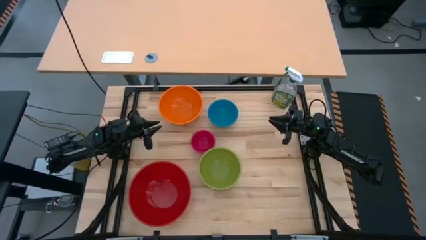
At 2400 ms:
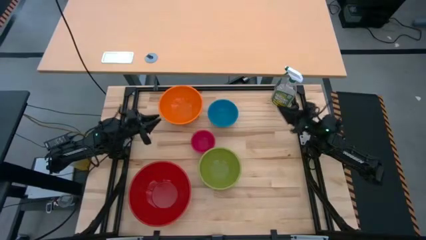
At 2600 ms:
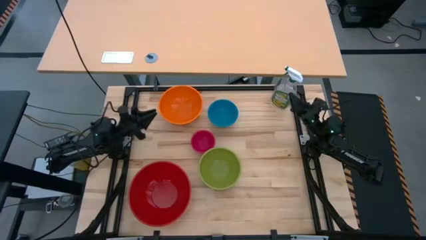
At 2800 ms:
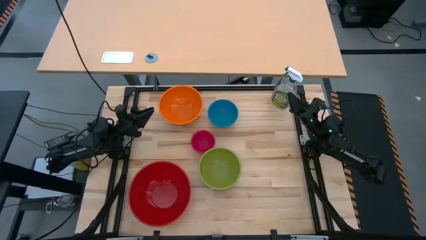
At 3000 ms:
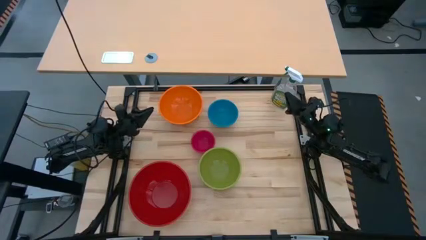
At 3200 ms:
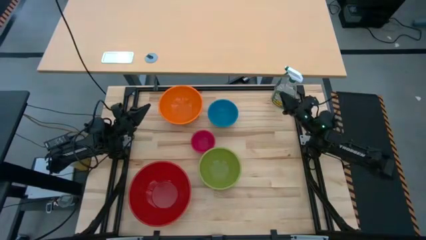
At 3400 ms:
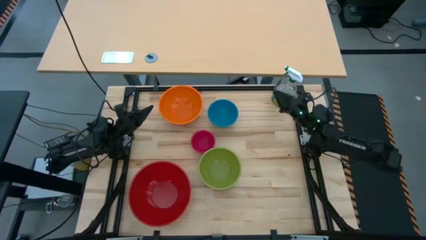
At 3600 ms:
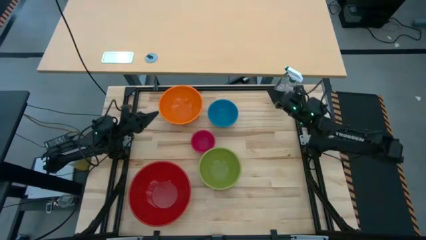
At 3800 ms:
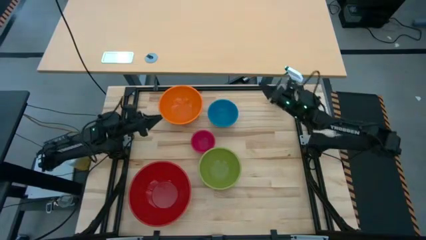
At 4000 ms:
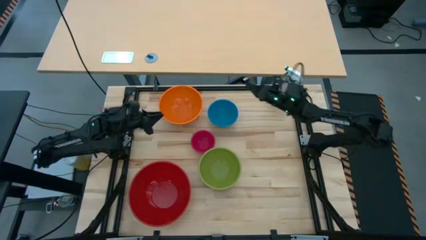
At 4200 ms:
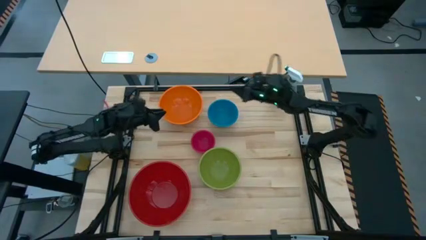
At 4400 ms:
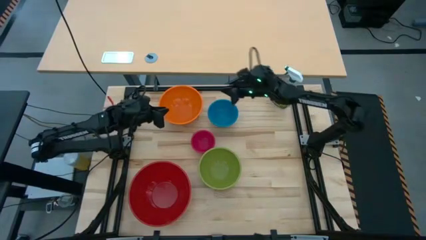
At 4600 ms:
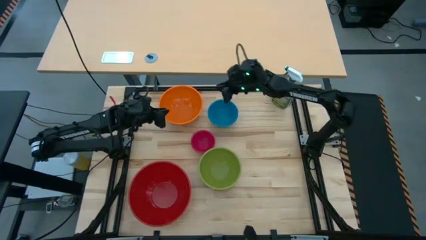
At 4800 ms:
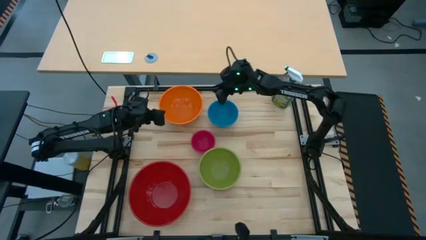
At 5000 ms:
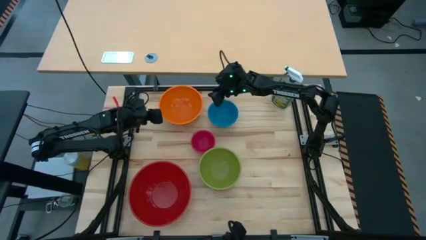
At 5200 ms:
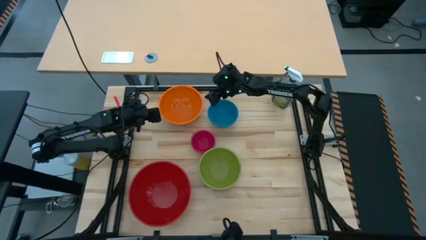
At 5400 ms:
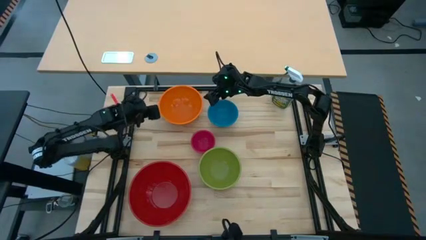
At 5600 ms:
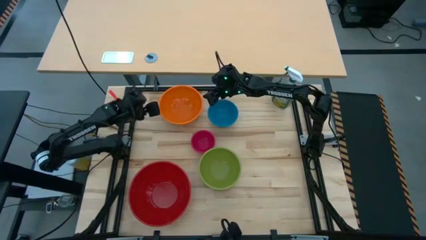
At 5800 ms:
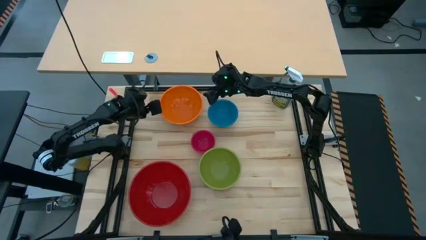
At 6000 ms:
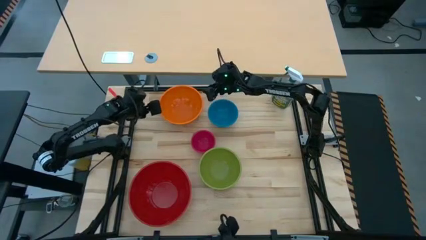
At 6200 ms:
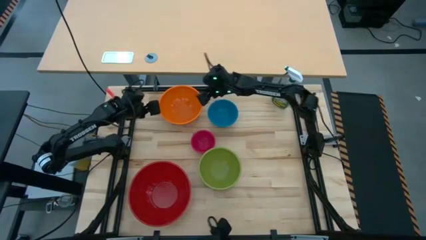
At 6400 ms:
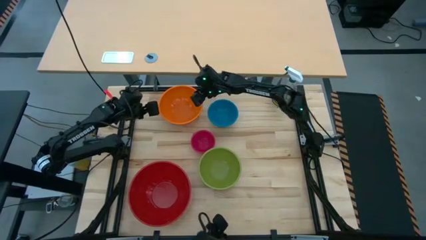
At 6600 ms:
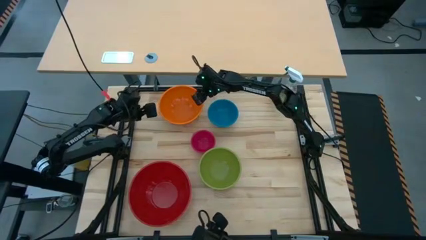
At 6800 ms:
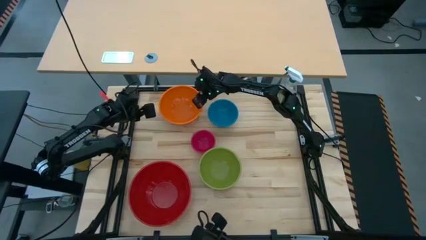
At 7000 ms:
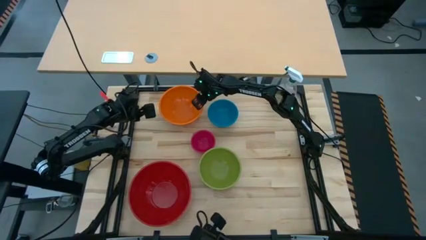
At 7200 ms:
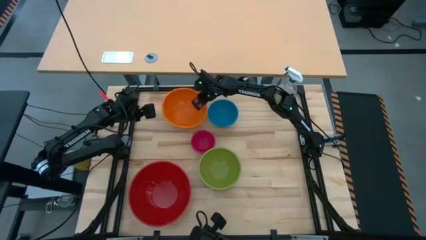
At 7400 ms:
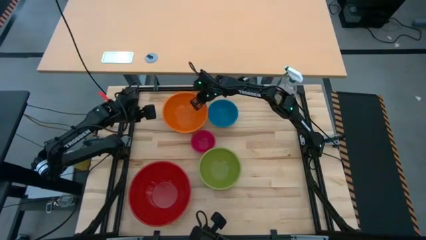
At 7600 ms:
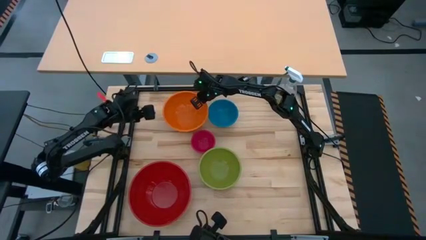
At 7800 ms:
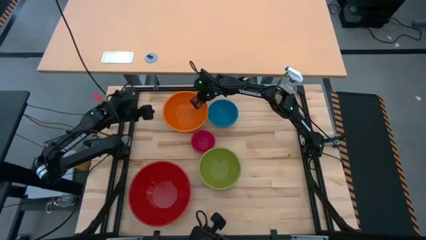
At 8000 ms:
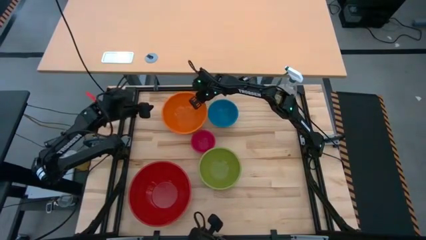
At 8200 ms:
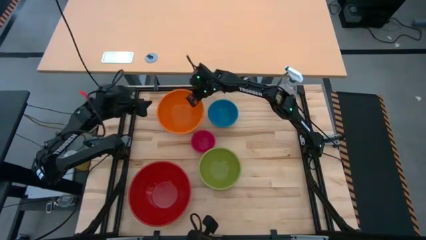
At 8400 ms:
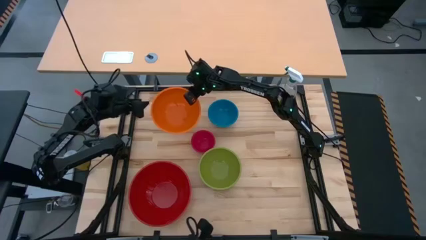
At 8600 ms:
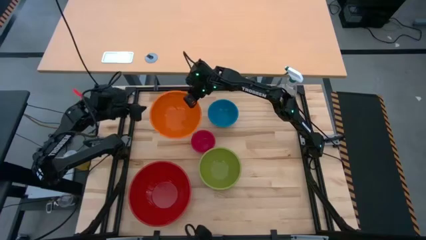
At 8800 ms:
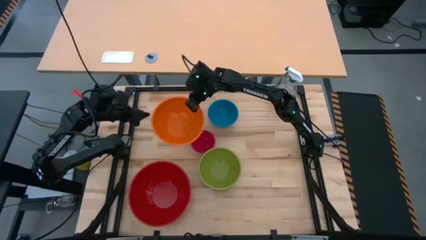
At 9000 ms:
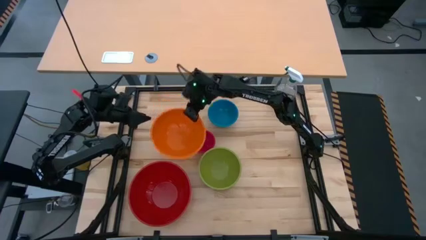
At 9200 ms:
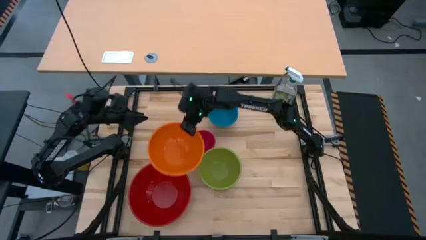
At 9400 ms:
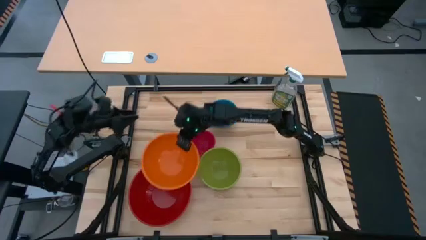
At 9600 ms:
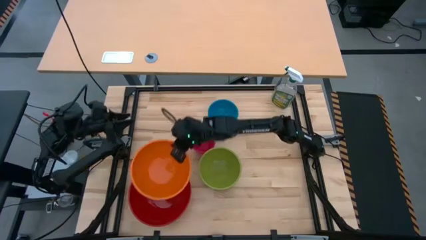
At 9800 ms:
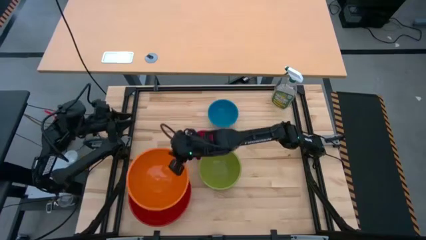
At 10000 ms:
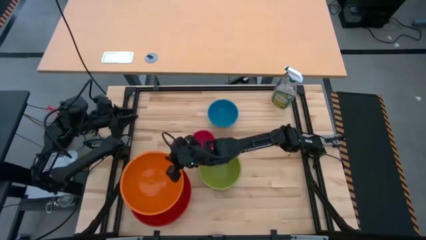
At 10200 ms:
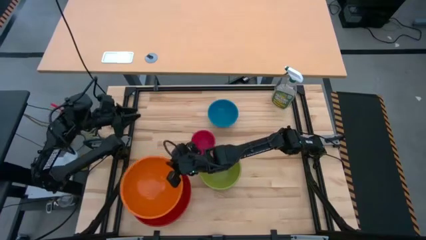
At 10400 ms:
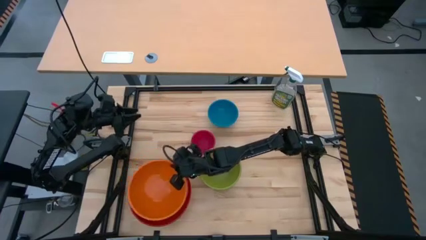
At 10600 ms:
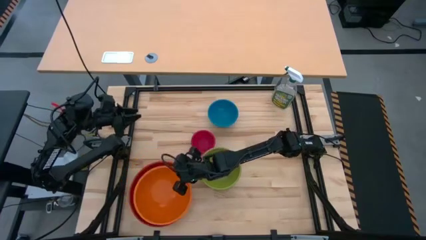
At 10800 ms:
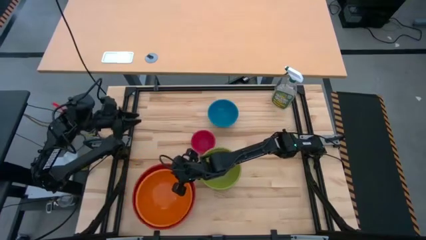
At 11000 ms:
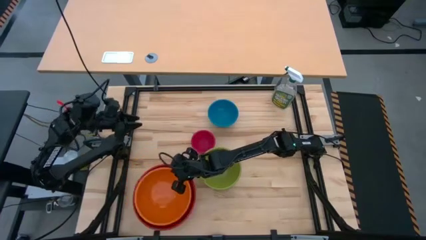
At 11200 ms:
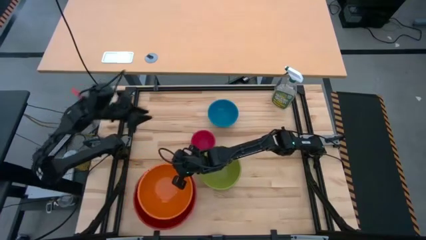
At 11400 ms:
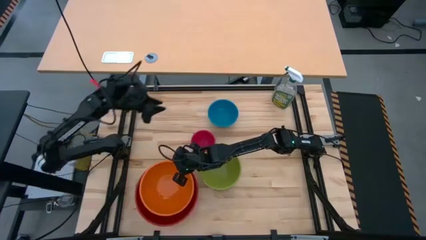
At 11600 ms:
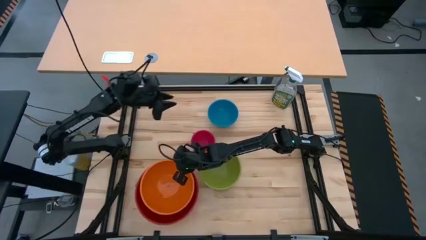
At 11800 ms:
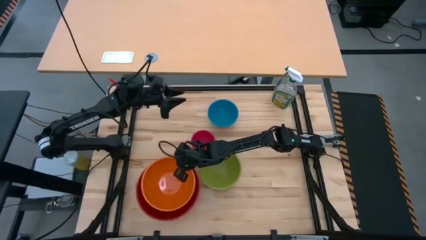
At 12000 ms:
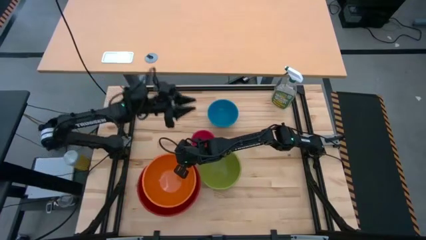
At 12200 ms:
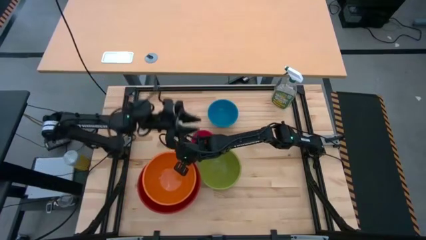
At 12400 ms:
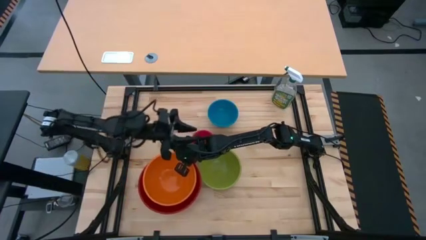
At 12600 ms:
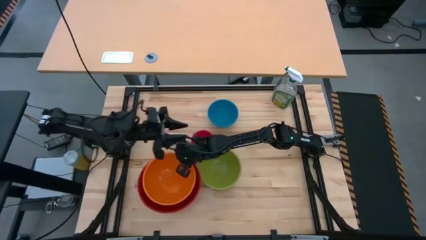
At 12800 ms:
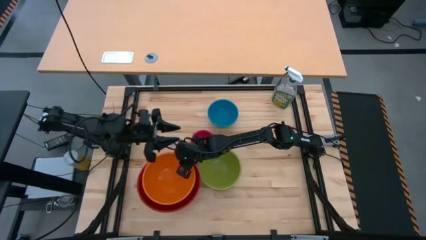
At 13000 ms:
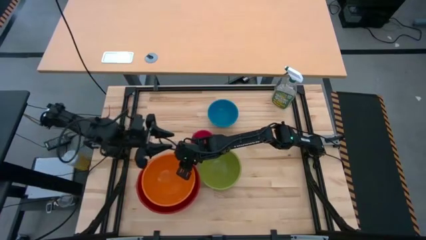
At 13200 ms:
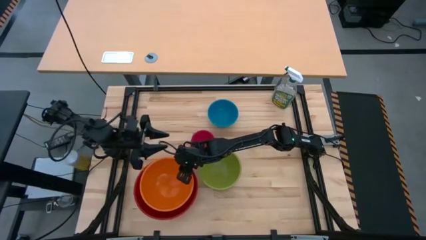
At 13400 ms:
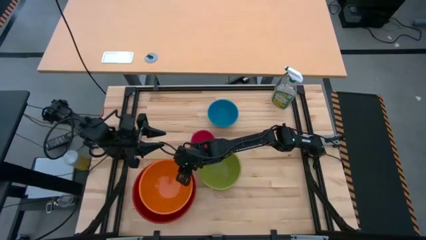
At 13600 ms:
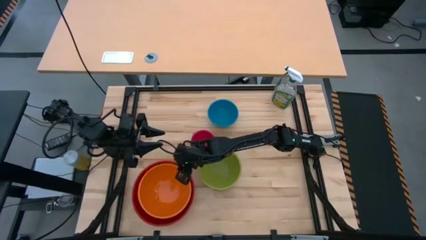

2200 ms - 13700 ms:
Stack the orange bowl on top of the red bowl

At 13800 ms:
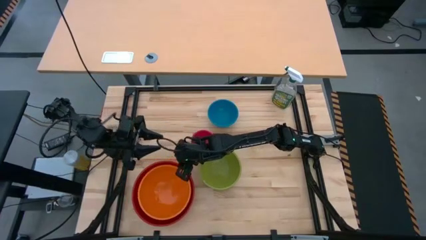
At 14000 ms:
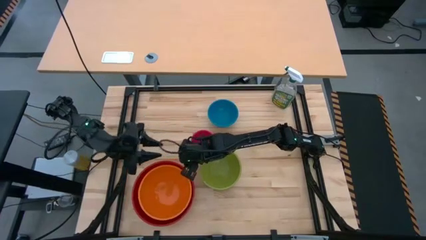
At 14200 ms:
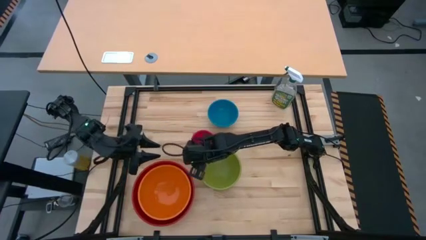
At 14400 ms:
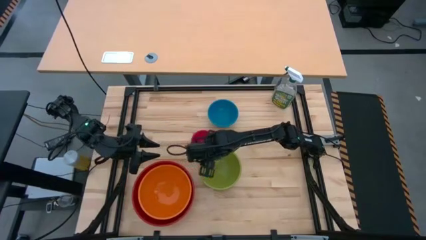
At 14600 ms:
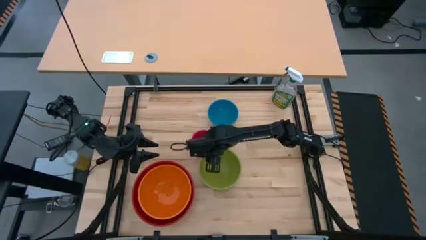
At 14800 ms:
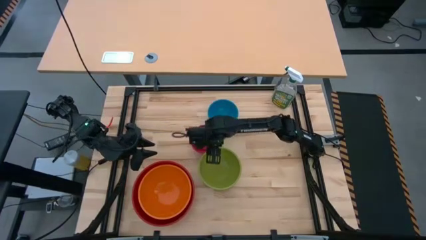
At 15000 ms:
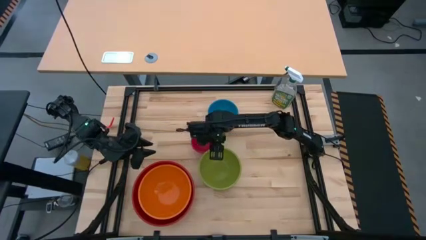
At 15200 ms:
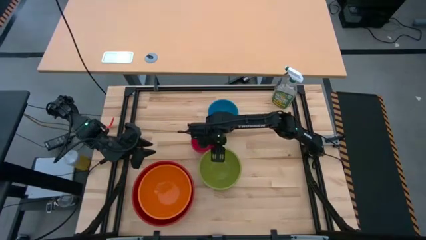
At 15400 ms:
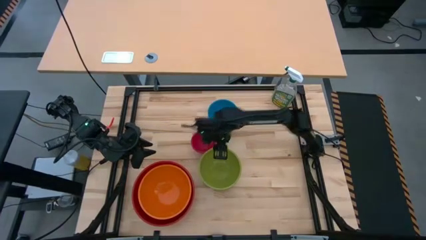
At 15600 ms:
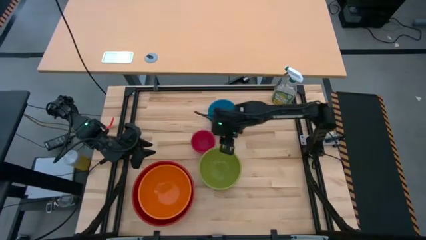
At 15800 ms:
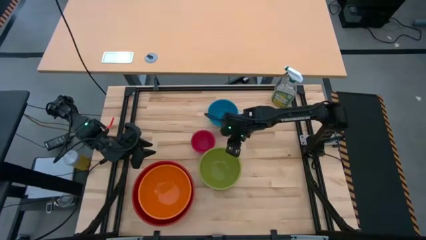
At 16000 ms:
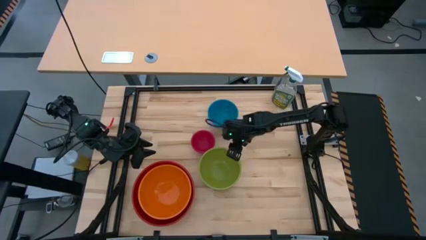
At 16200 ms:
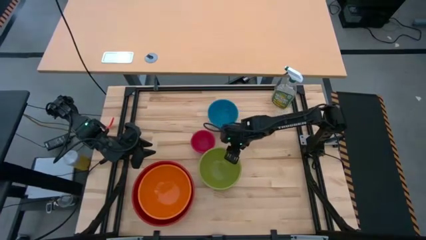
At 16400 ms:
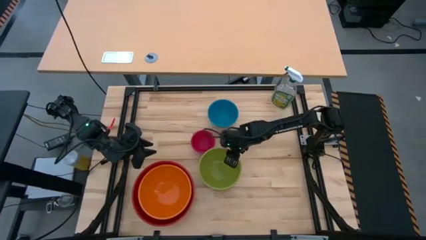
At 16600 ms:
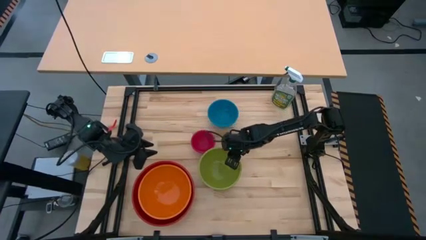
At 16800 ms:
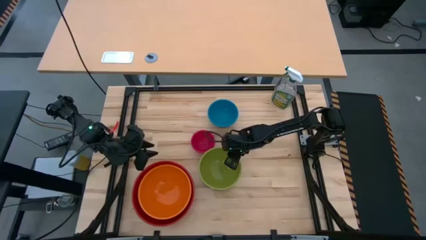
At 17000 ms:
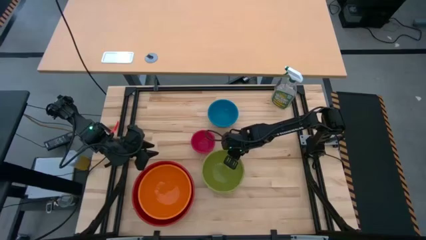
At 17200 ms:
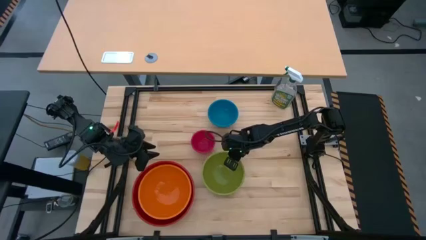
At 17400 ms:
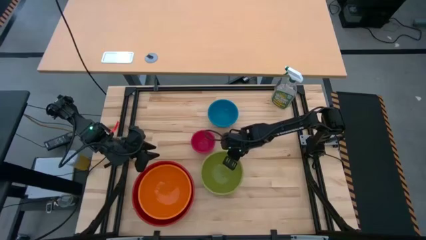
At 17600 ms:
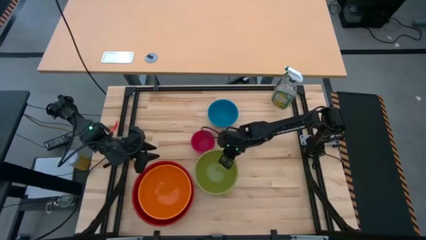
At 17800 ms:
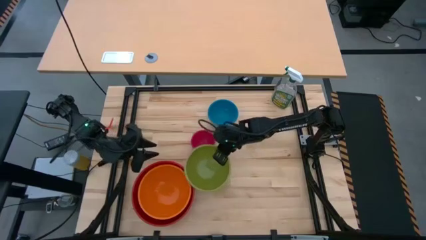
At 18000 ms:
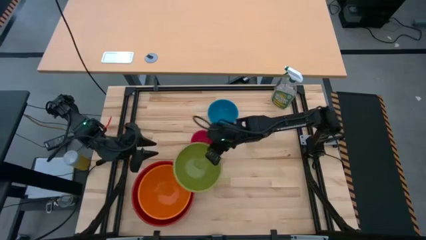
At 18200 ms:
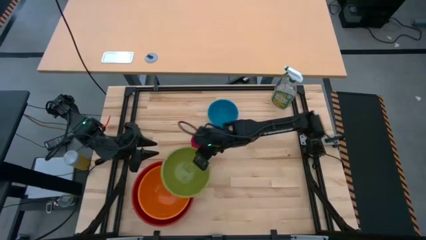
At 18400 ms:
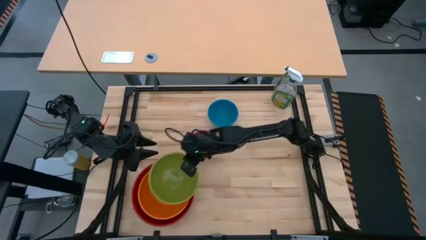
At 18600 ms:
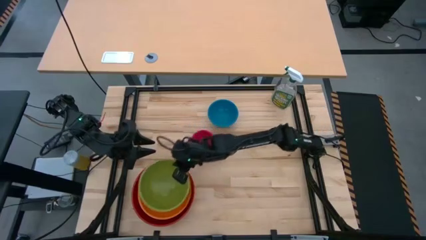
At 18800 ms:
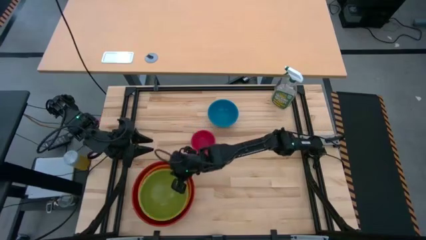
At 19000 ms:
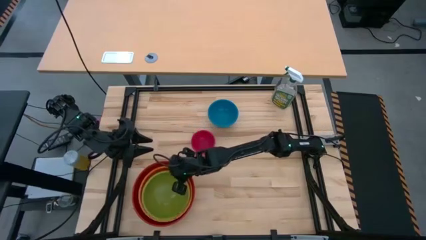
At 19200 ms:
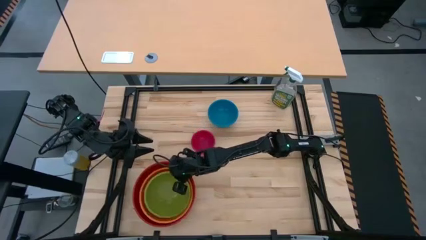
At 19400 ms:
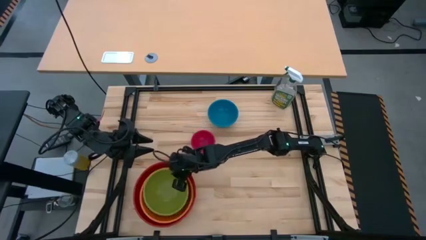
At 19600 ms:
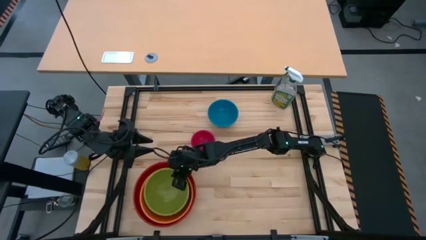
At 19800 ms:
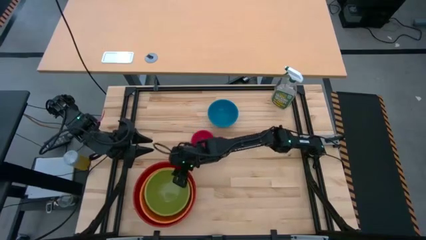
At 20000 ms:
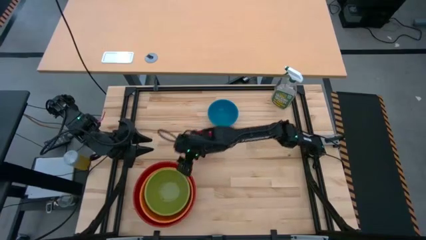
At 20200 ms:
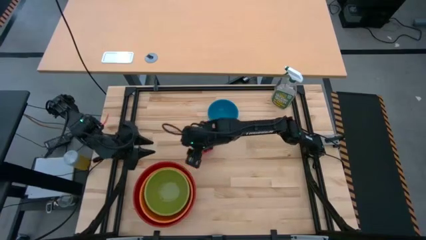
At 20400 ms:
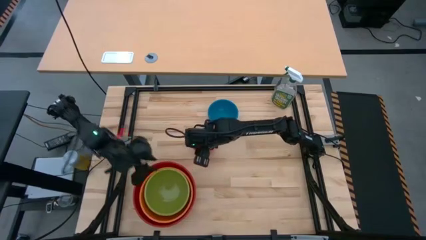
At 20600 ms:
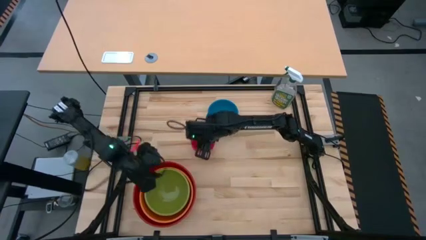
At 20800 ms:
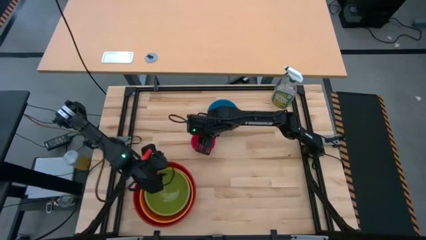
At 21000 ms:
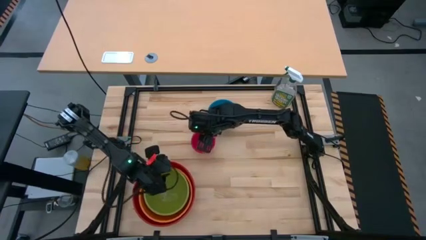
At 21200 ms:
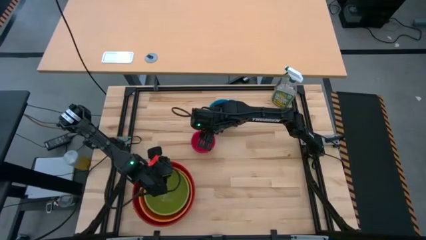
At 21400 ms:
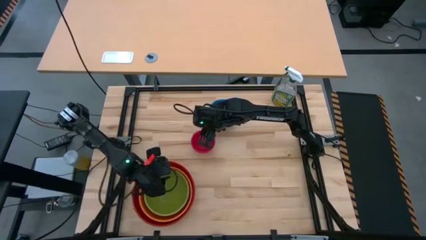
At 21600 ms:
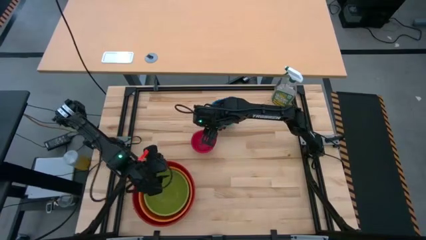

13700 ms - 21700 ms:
Stack the green bowl on top of the orange bowl
